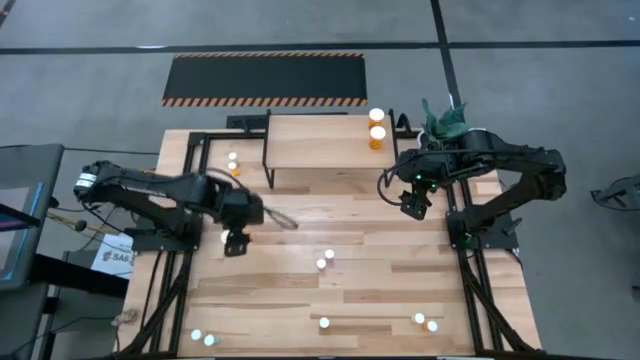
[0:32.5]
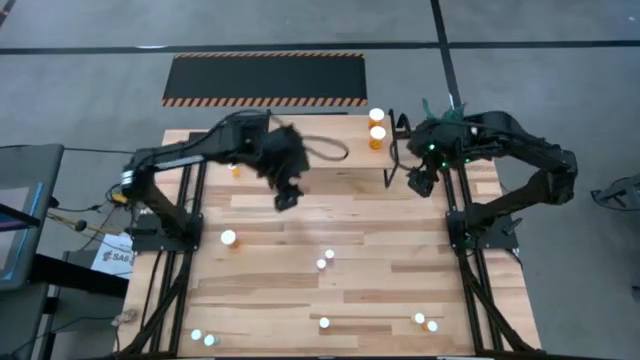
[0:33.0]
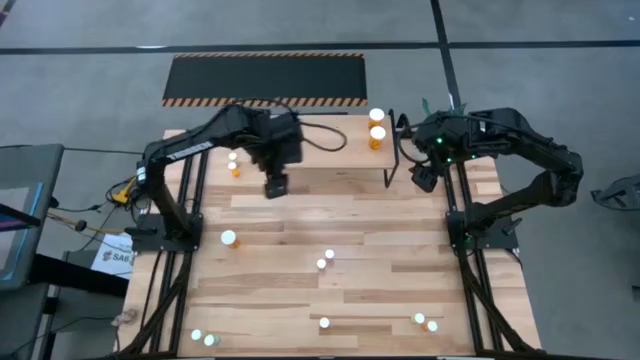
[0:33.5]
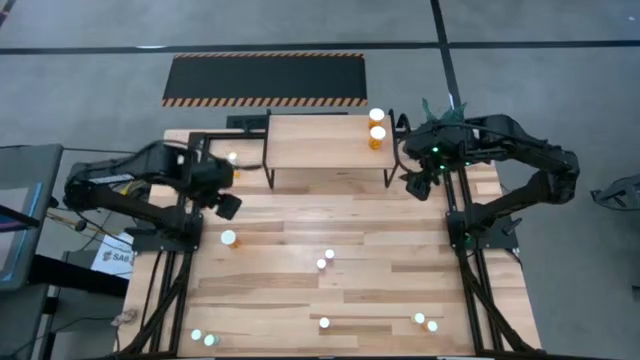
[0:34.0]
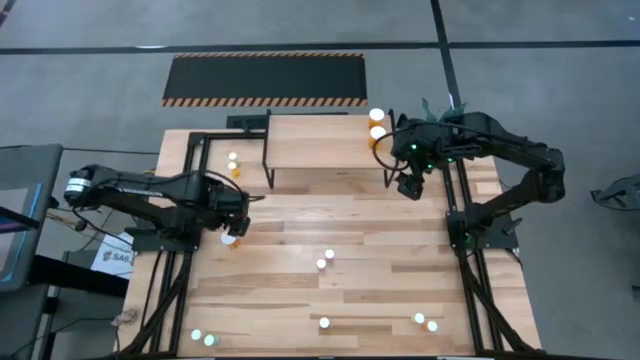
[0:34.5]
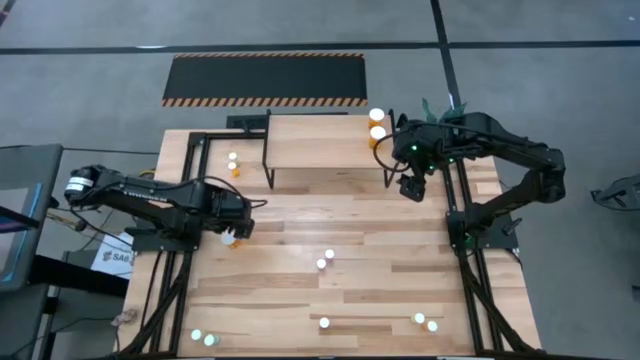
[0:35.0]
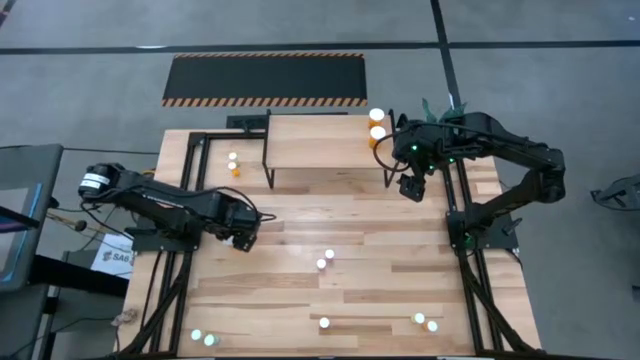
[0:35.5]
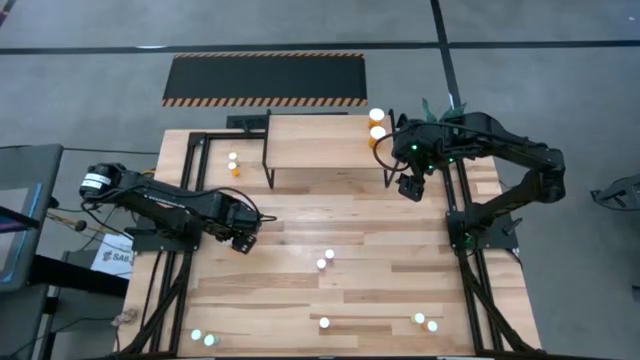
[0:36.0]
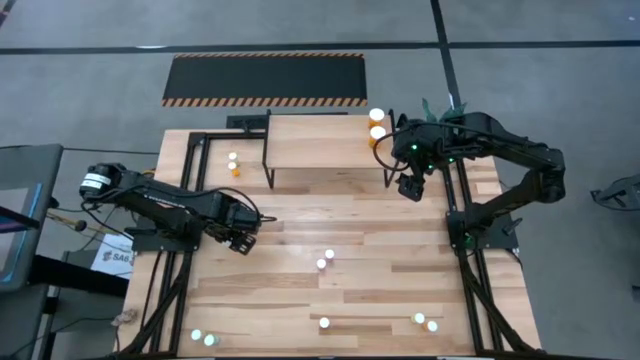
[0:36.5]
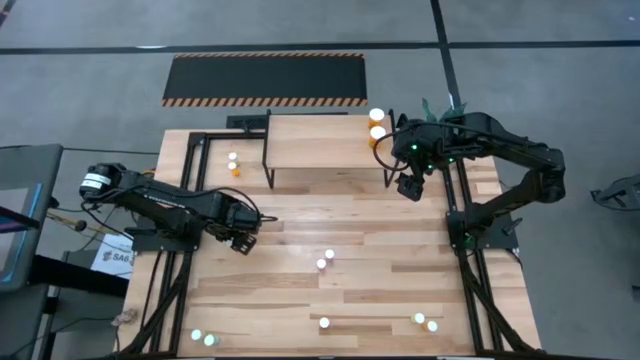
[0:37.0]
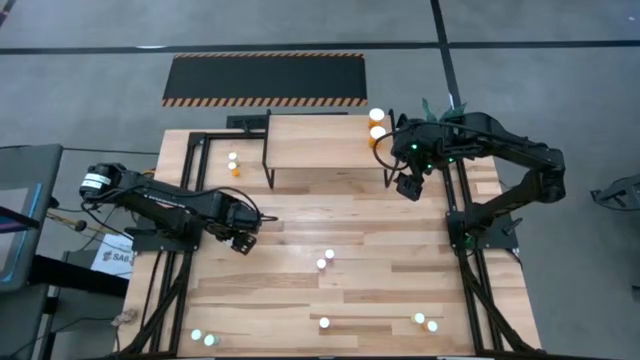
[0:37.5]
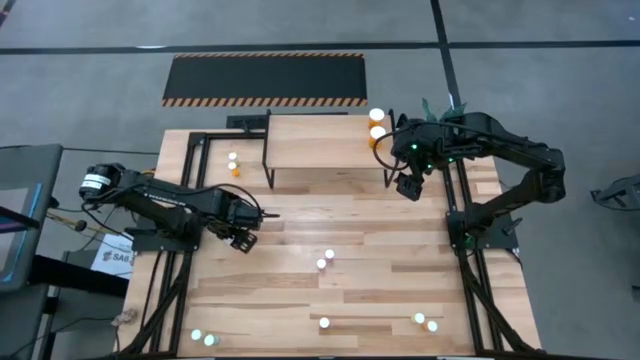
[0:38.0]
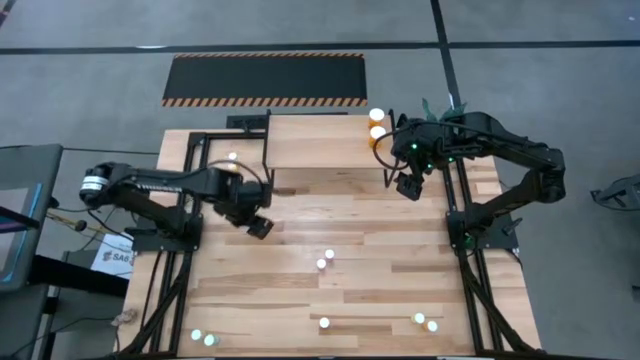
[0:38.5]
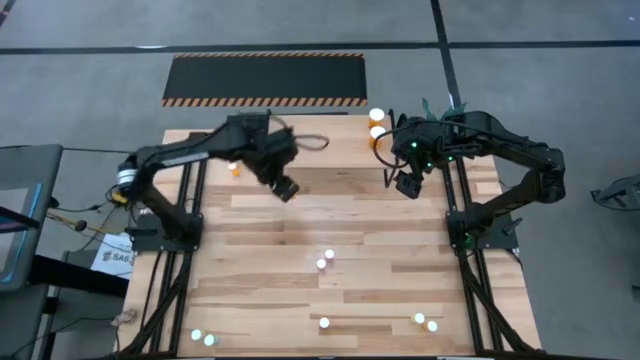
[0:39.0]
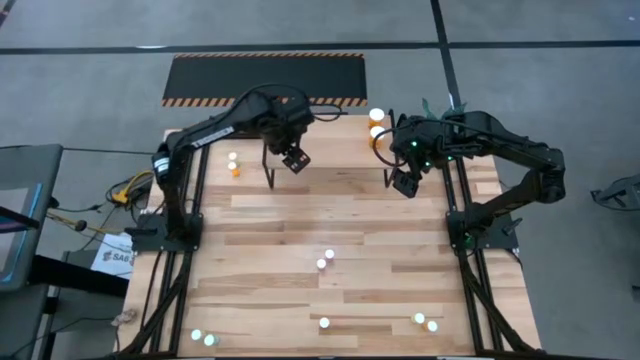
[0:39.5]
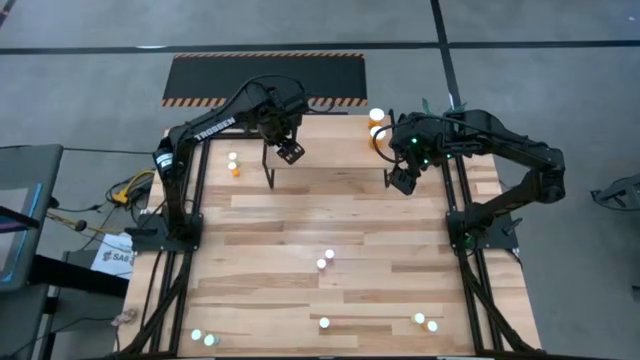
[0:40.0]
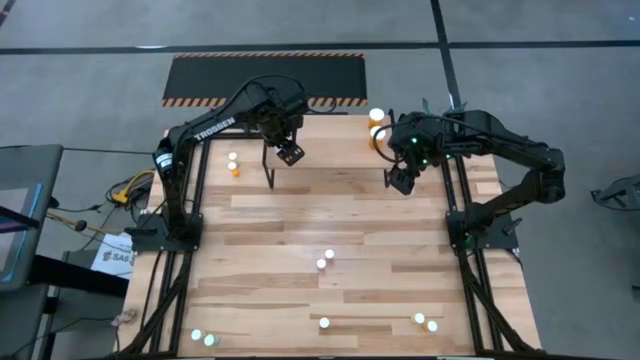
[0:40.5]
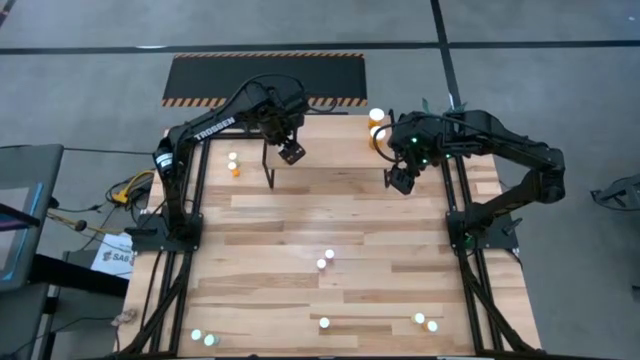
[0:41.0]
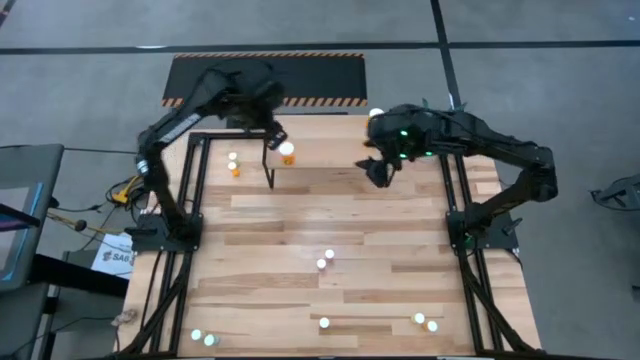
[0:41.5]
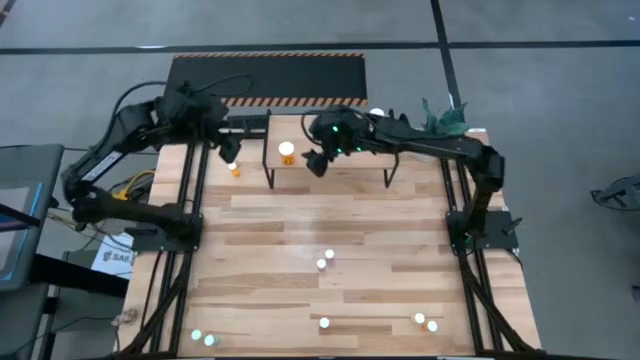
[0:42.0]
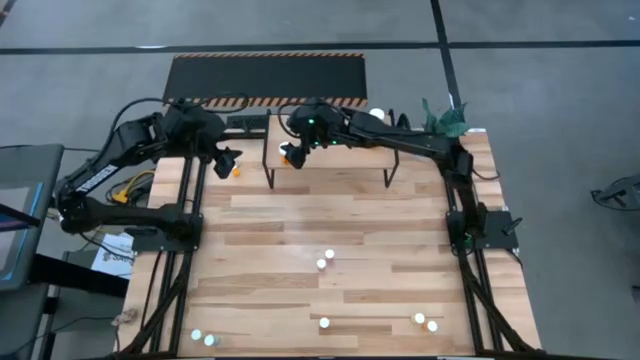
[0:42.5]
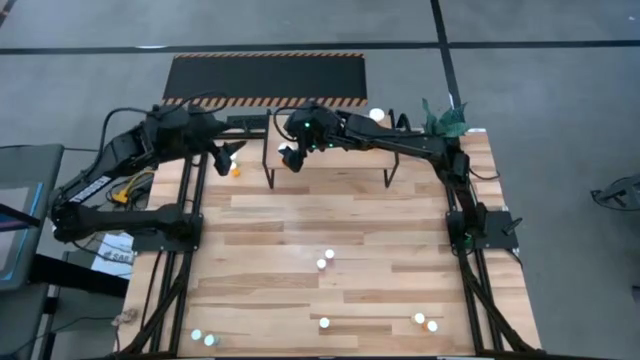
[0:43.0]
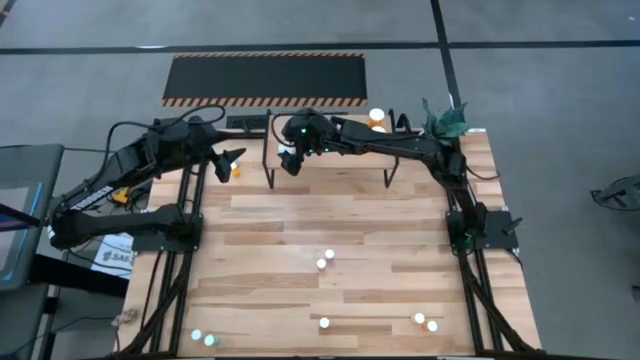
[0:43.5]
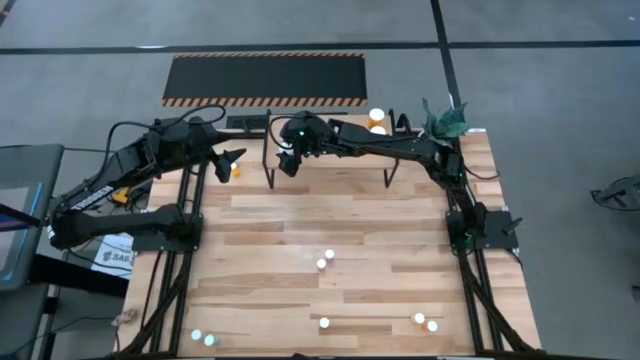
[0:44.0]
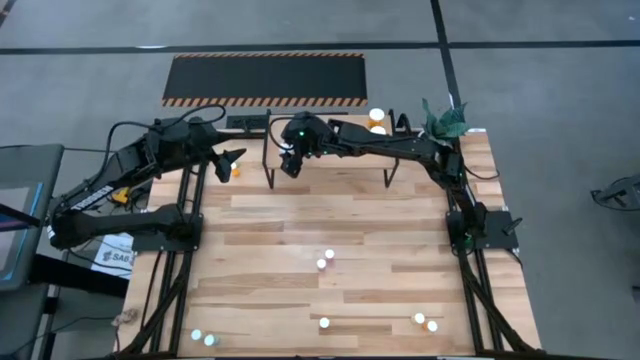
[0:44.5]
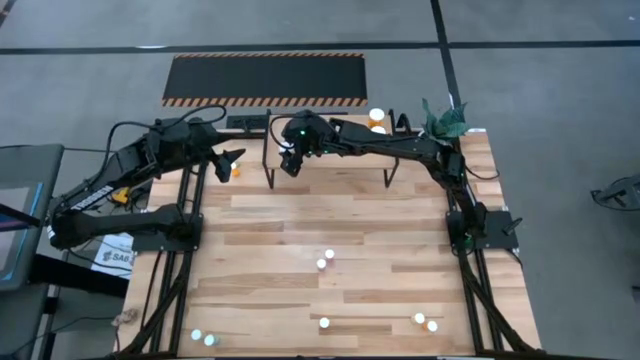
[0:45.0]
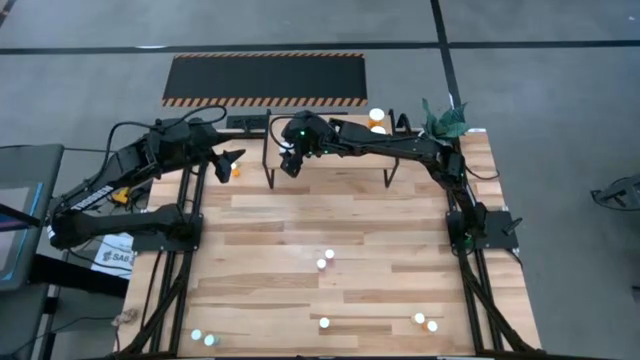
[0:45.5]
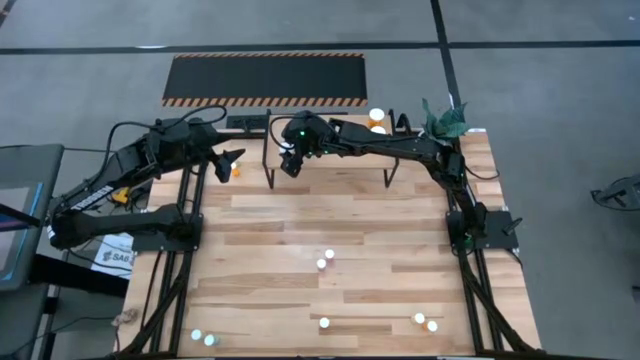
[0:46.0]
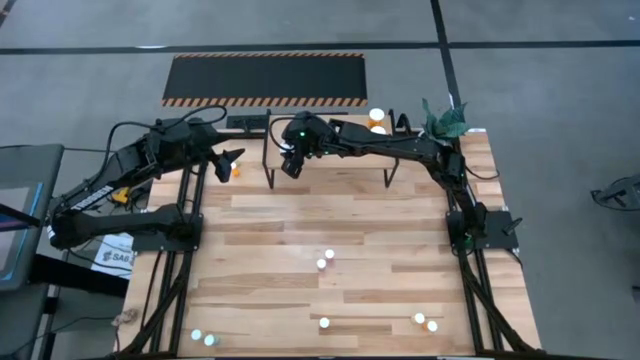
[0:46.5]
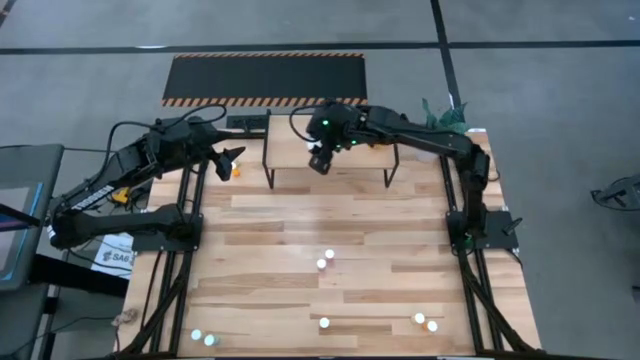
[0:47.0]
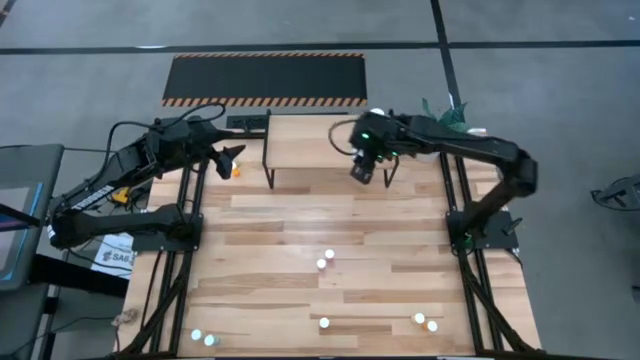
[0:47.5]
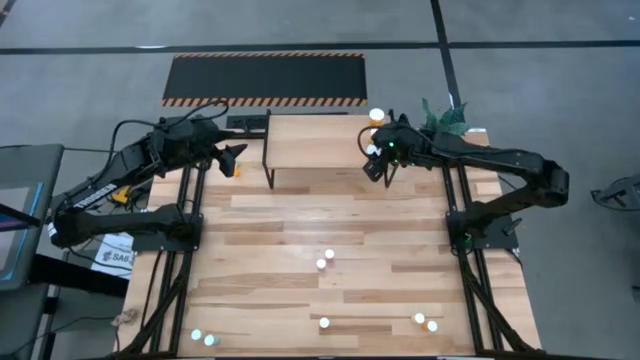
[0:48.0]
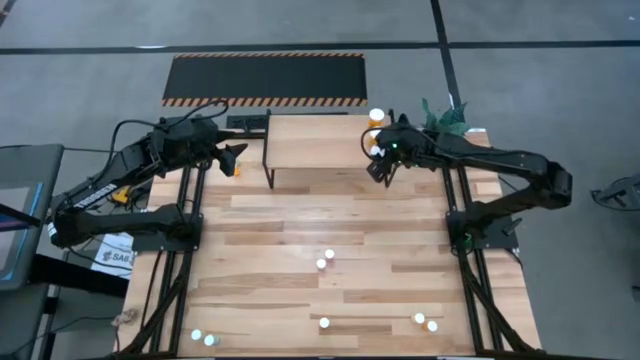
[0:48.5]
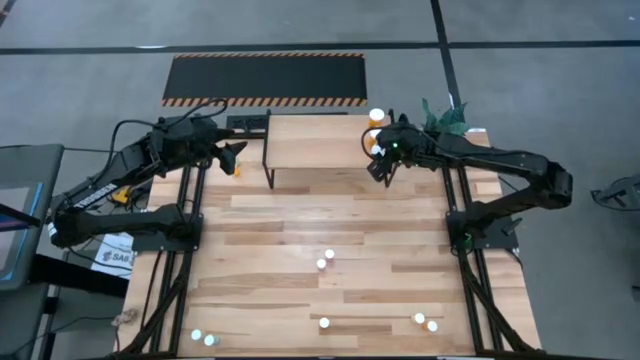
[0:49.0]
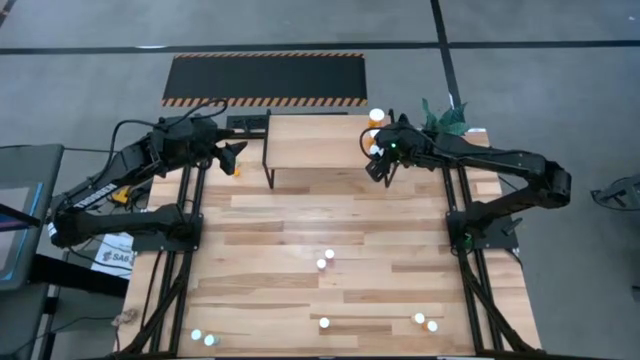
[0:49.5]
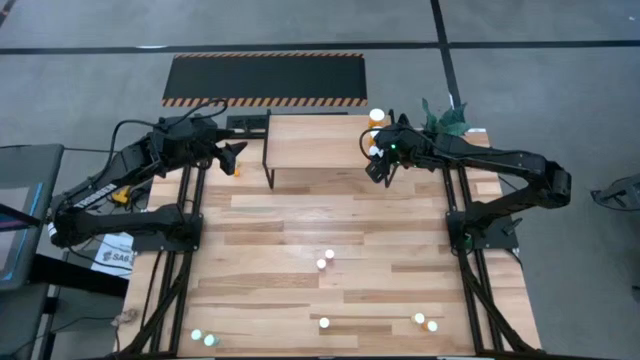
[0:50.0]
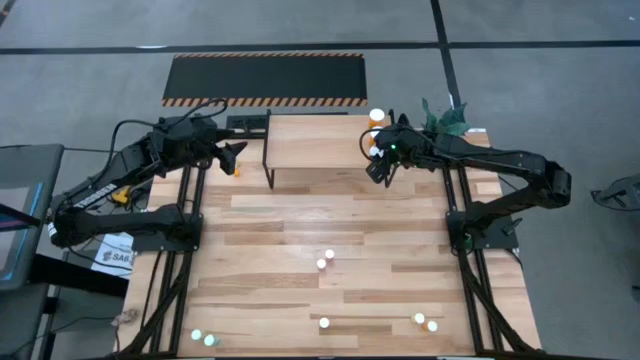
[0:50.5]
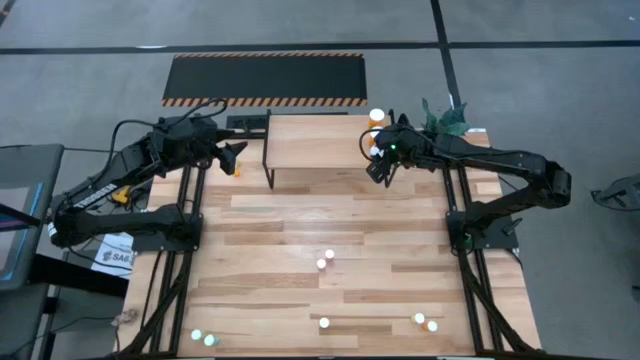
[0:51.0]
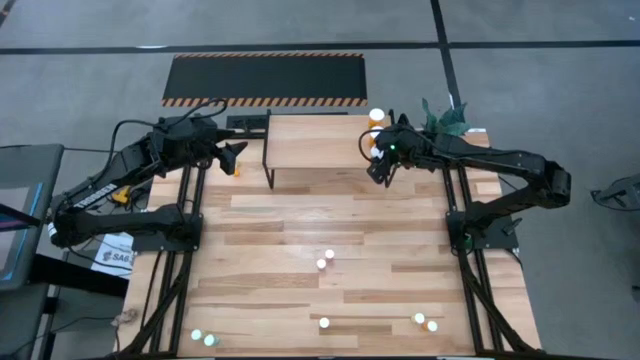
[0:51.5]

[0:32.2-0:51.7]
Task: Pick and place medicine bottles onto shelf by color
Put the large orange pill bottle on the shelf aligned with the other large orange pill bottles

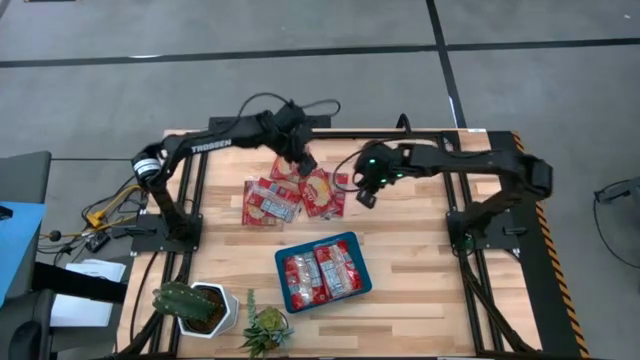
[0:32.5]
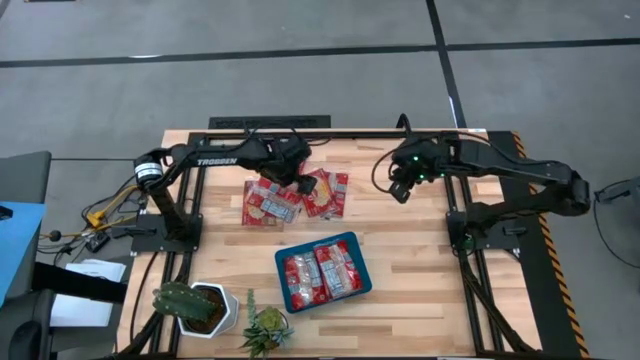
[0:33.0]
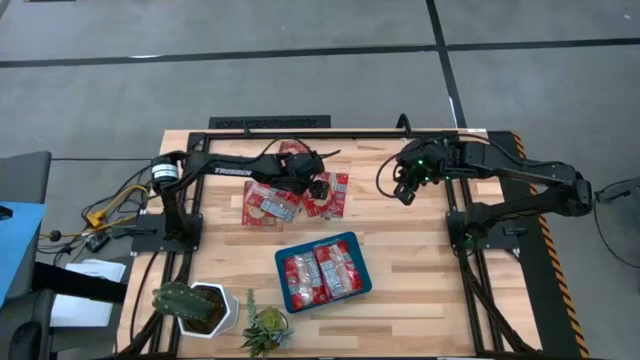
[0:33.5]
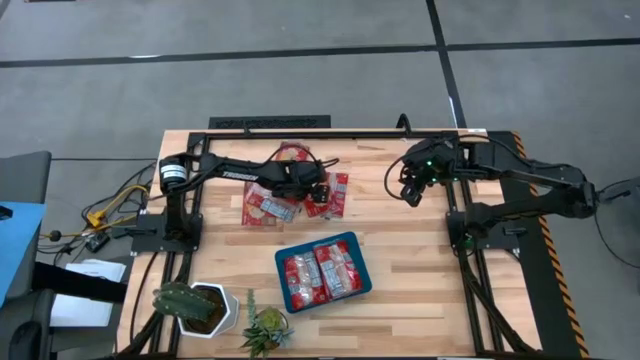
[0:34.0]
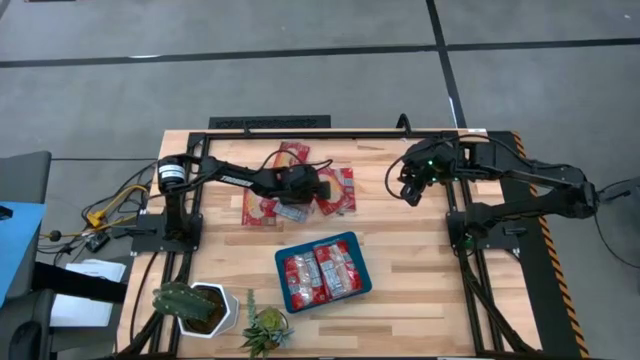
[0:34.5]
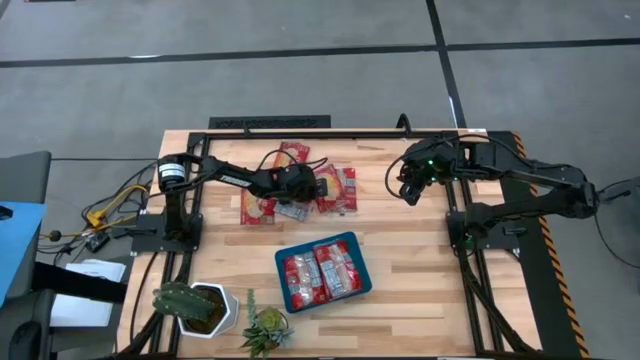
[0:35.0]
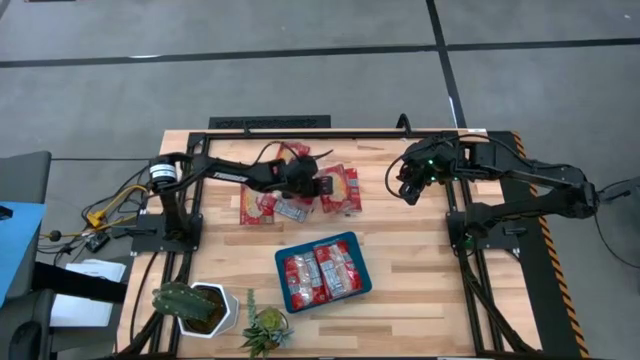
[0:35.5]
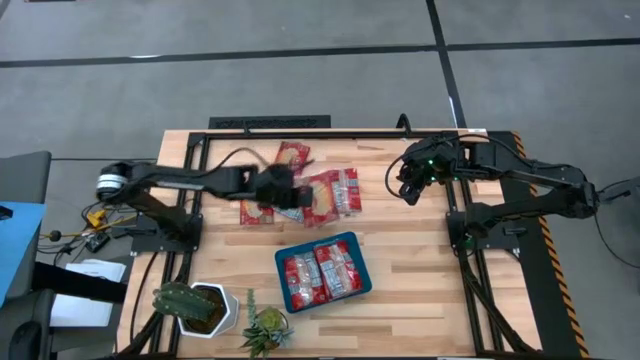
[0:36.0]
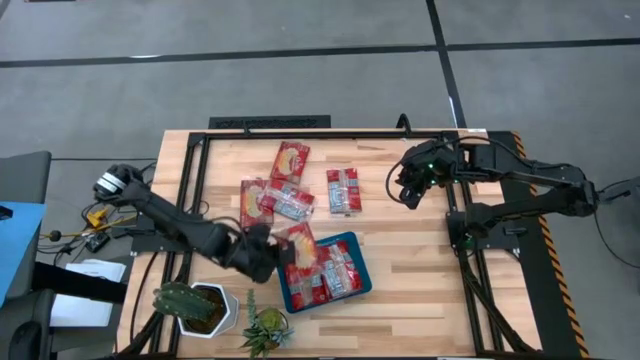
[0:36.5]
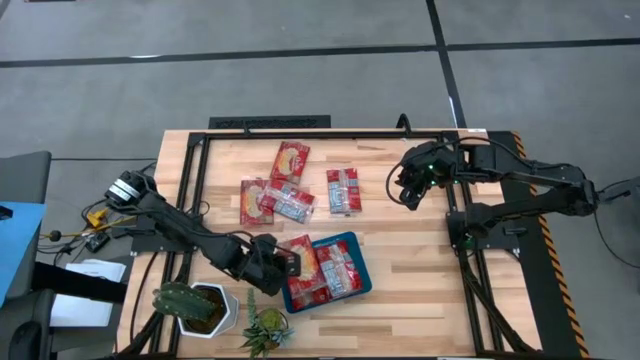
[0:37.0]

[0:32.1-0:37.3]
Task: Sort popcorn bags into baskets
Put the popcorn bag into the blue bin
